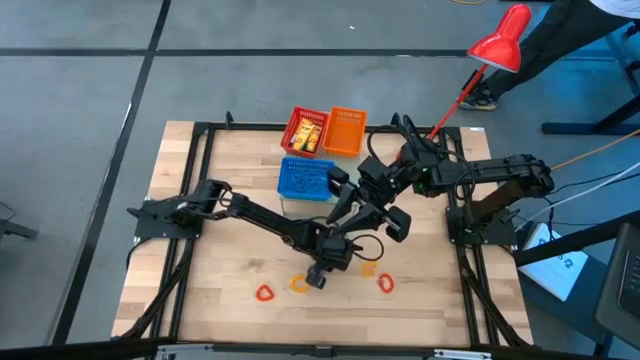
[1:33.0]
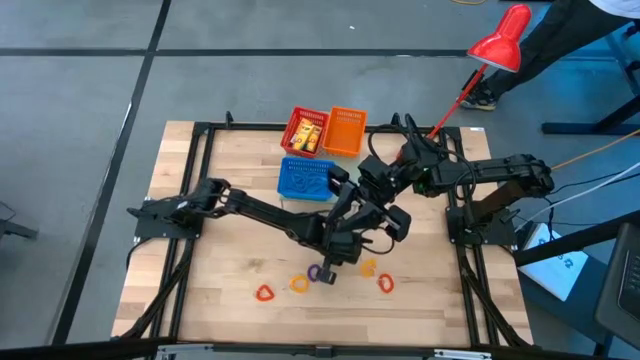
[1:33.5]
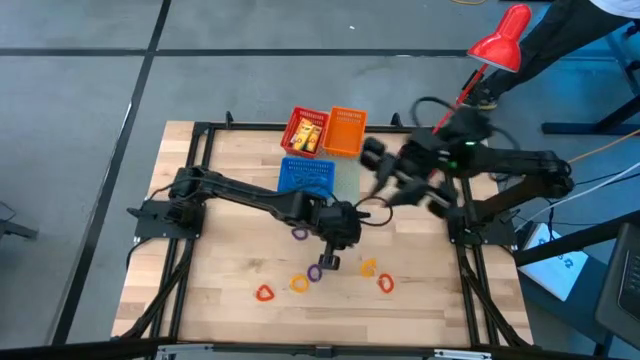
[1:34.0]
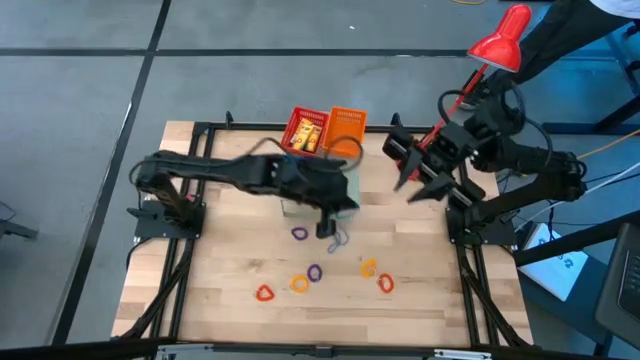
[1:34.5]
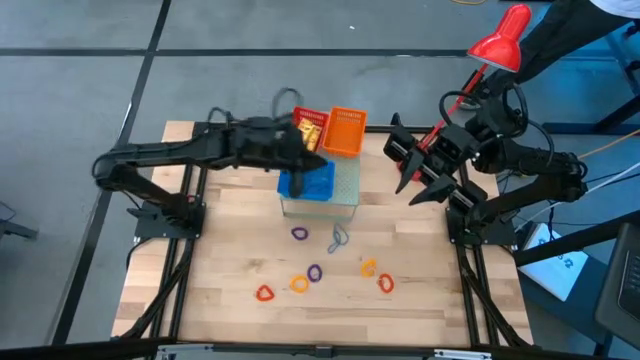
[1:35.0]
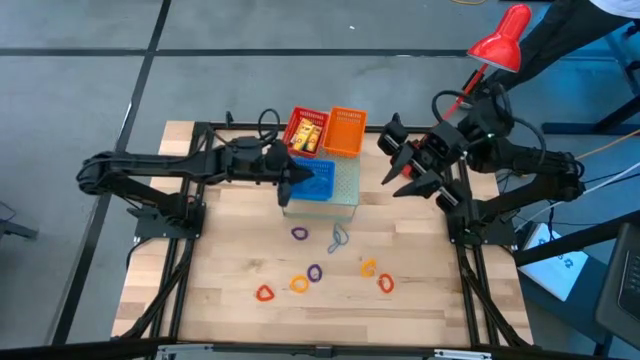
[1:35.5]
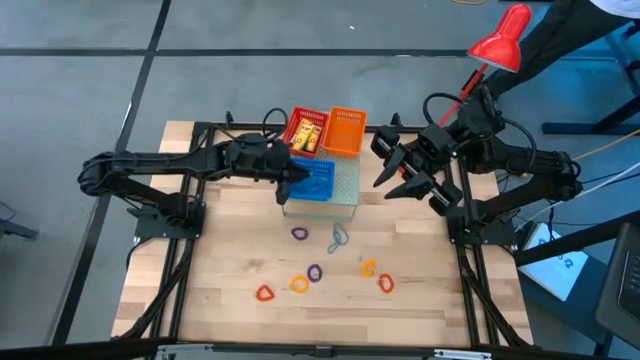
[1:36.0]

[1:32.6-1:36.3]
Task: Pick & Place Office Desk Supplies
Put the blue rubber band into the blue basket on the shelf

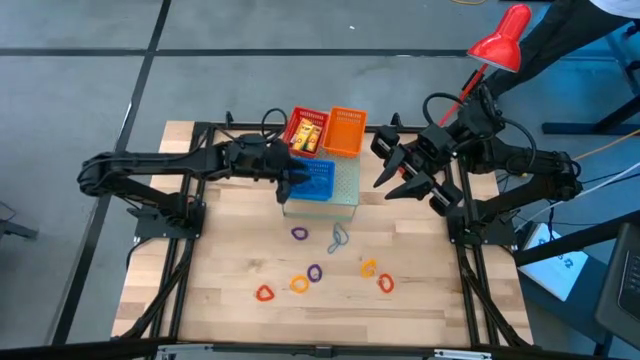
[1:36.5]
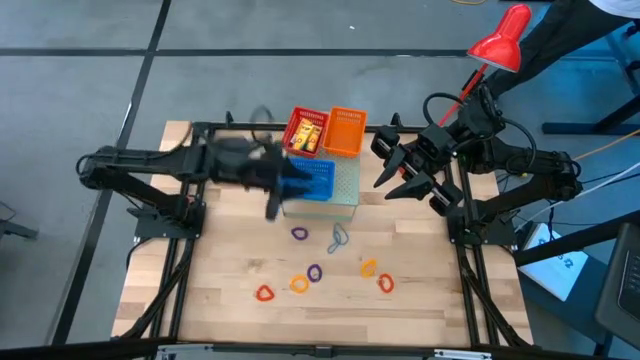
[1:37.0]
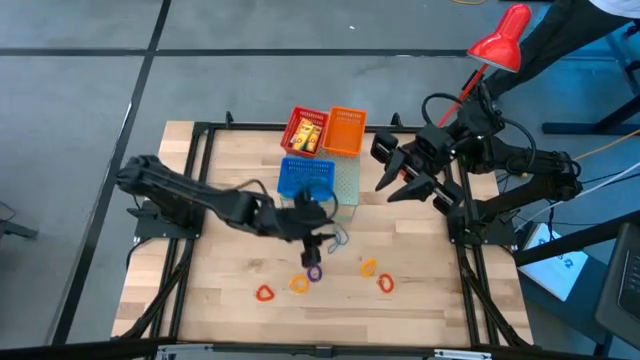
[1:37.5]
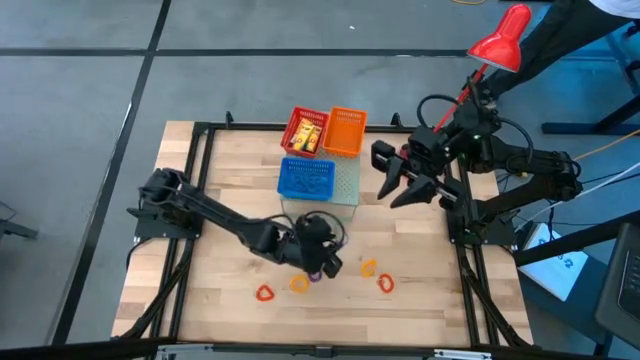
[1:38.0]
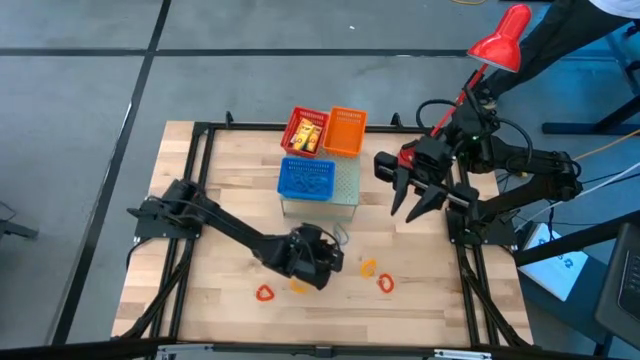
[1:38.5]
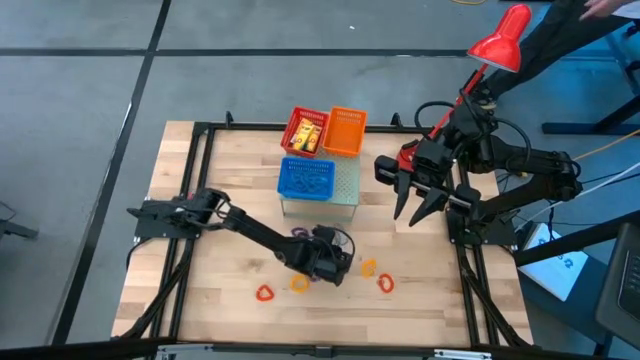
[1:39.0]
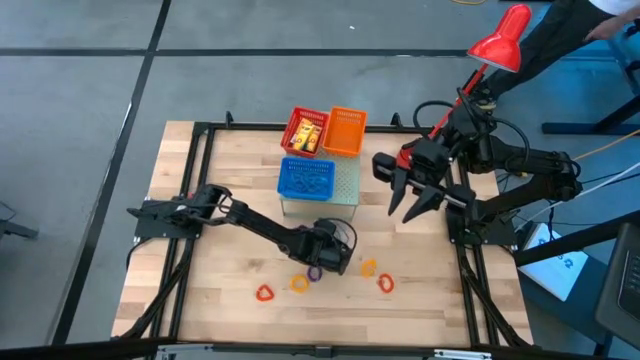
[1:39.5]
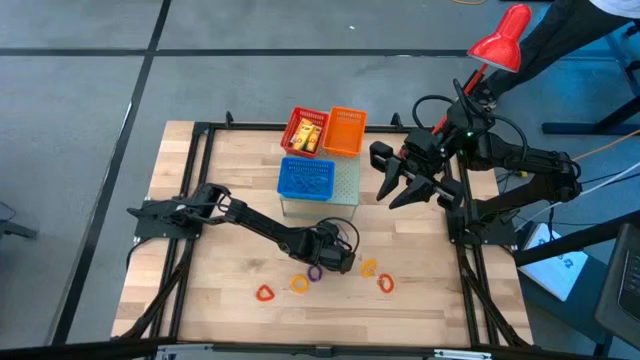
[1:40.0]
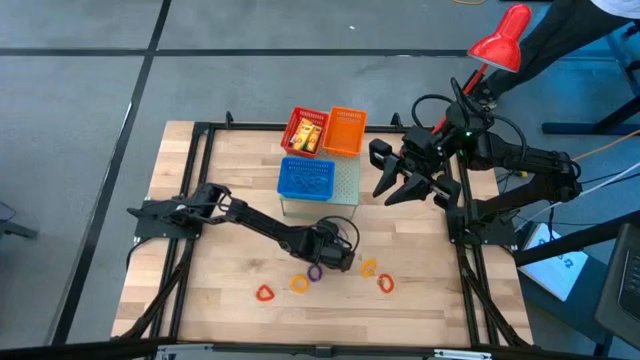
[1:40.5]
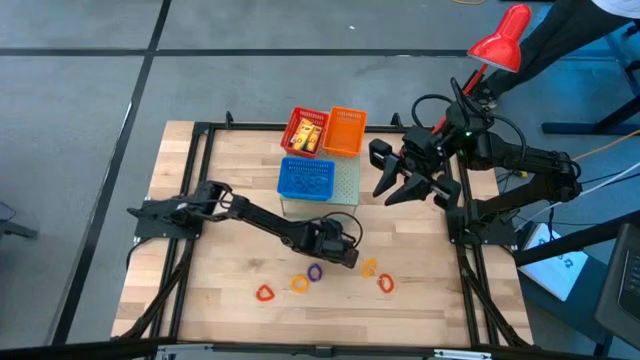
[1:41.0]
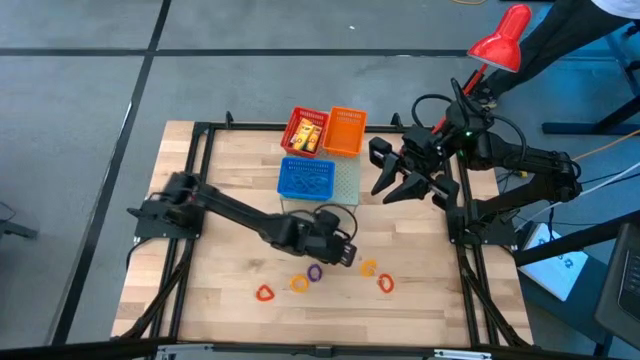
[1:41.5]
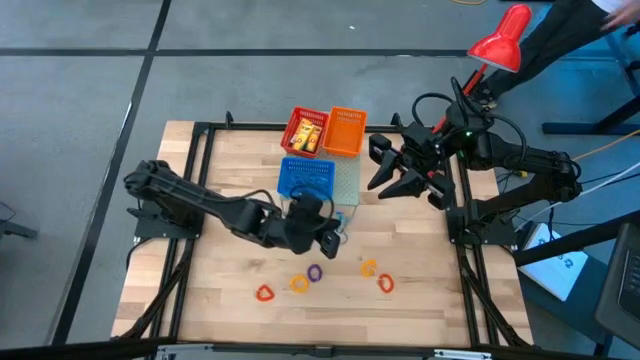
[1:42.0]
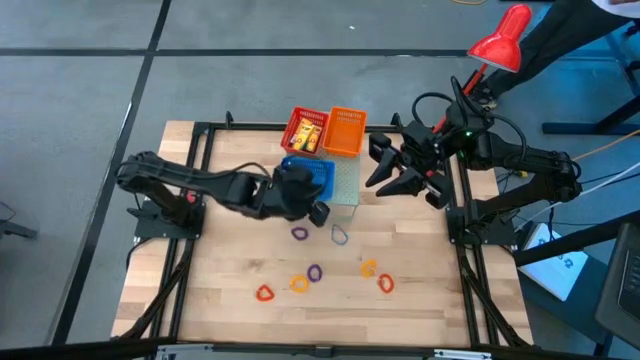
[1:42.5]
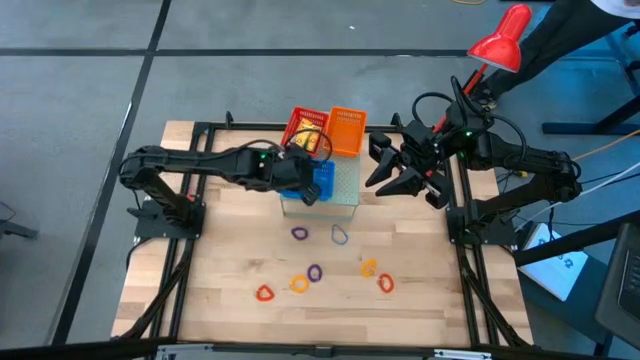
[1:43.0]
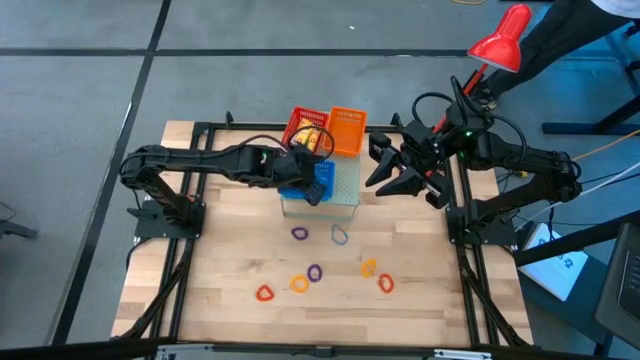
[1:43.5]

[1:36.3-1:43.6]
Put the blue rubber band into the blue basket on the shelf

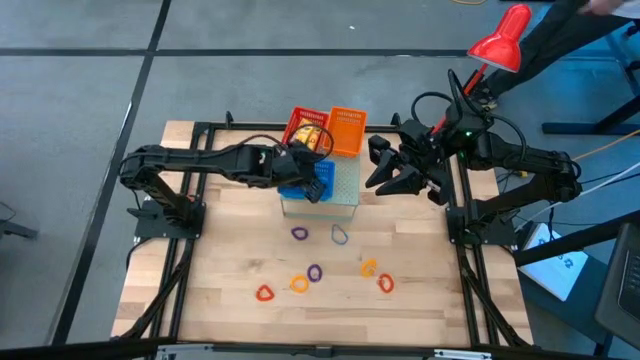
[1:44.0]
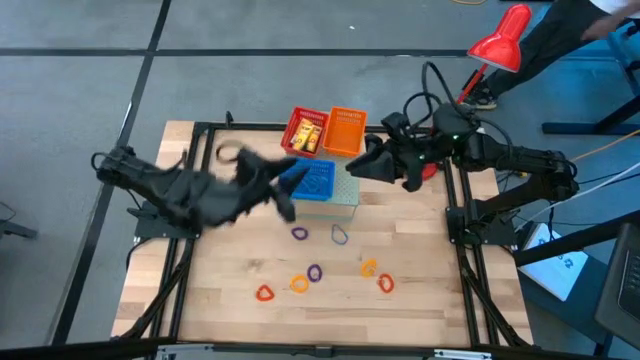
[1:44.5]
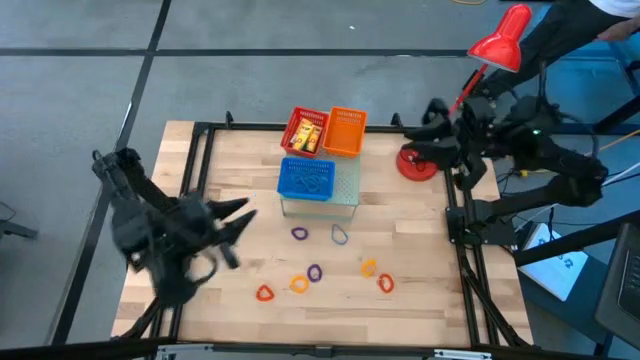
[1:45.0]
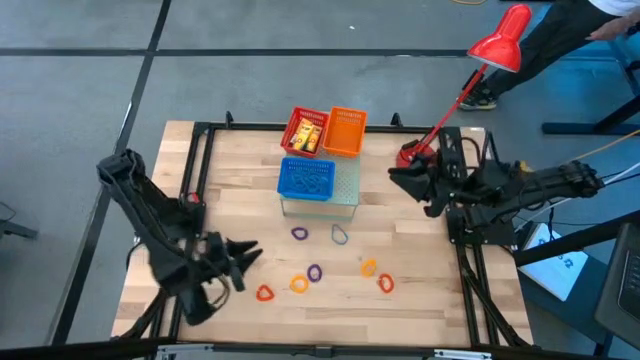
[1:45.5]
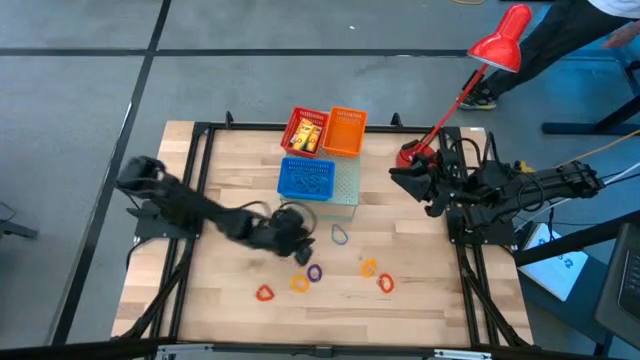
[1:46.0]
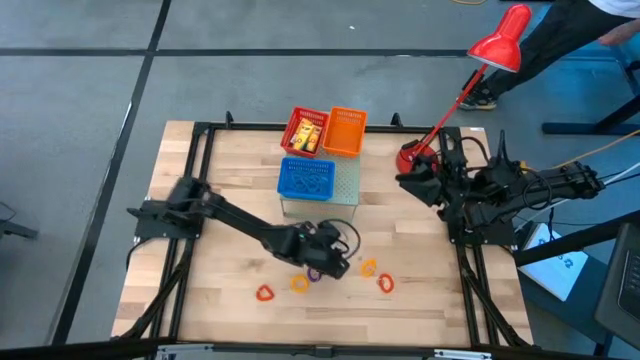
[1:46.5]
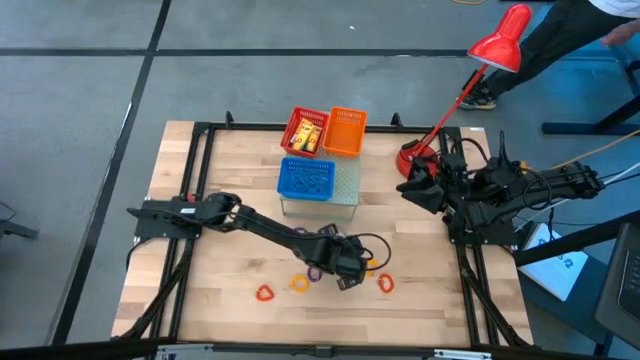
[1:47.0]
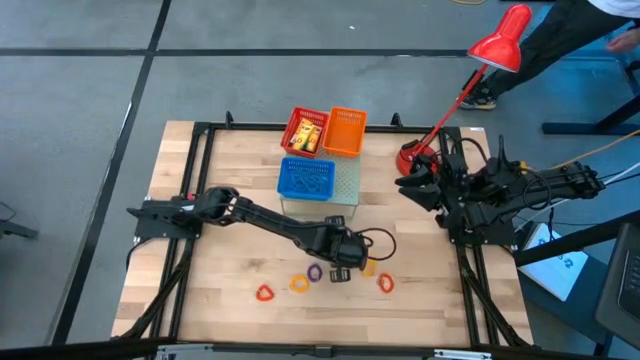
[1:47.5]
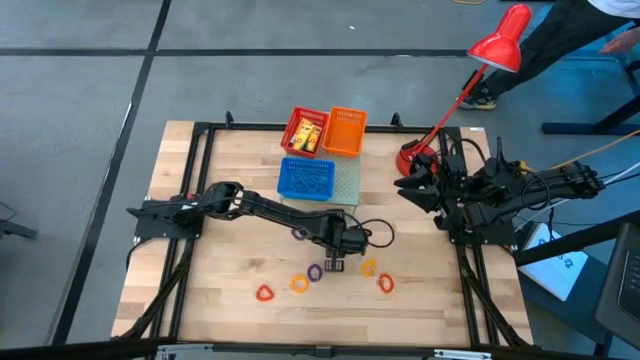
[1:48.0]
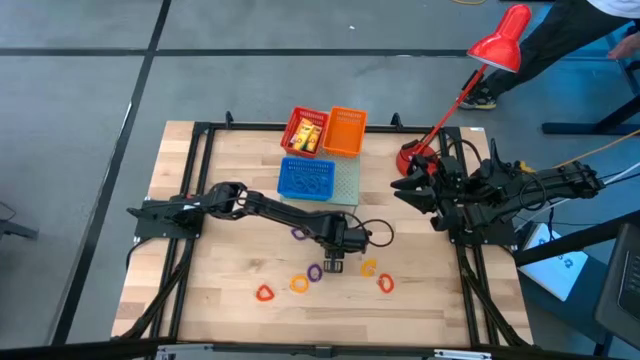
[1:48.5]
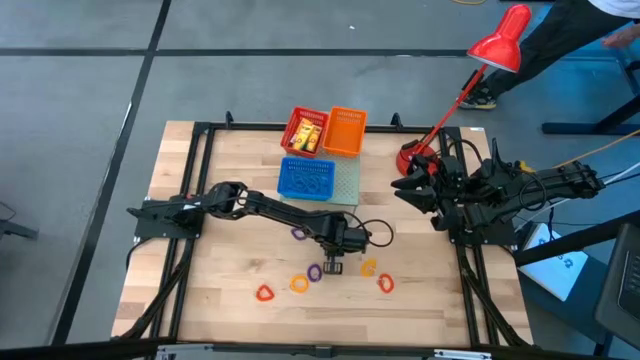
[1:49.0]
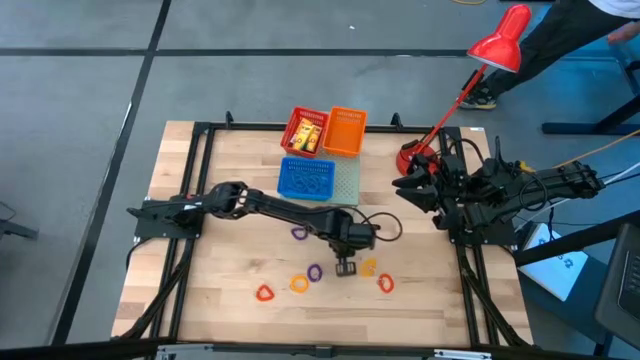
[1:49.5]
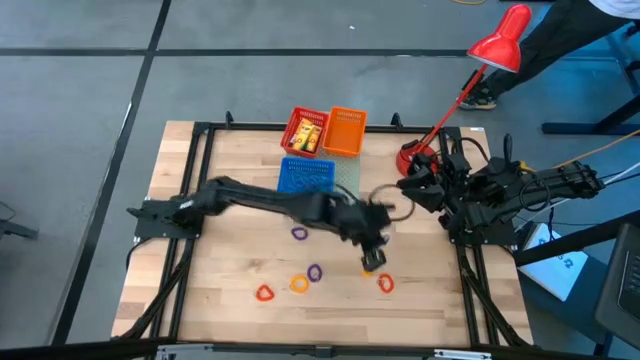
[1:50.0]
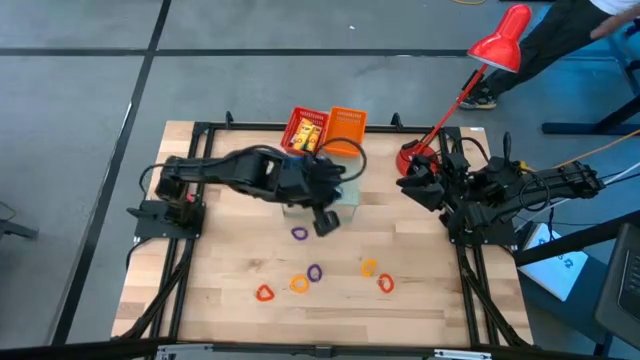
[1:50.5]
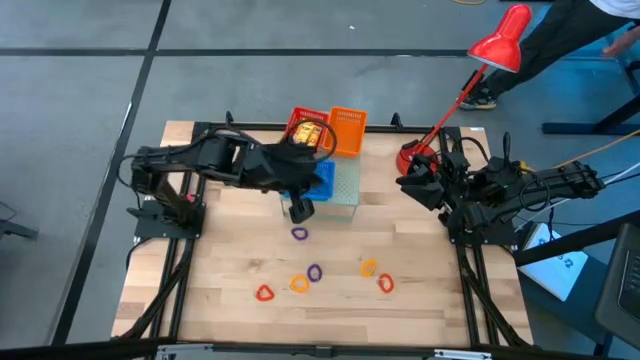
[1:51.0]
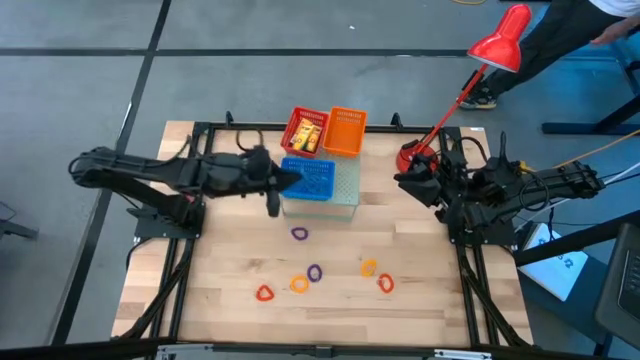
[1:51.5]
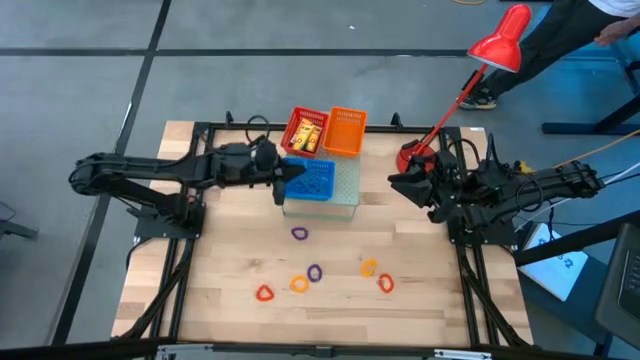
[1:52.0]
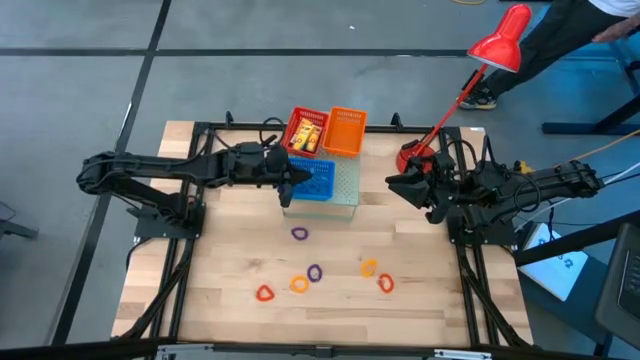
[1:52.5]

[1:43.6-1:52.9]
Put the blue rubber band into the blue basket on the shelf

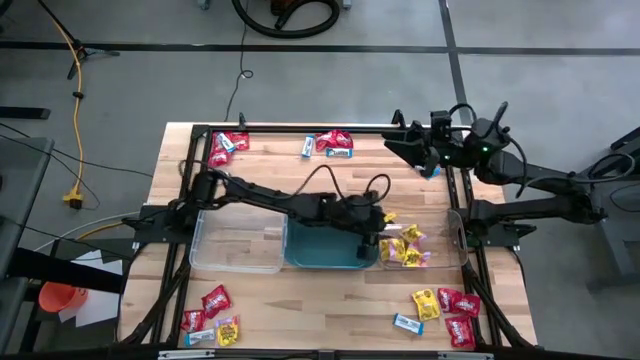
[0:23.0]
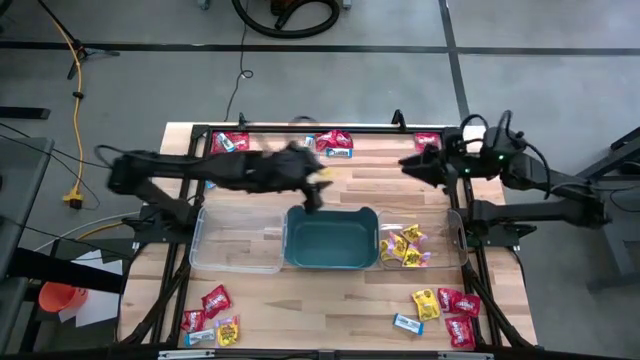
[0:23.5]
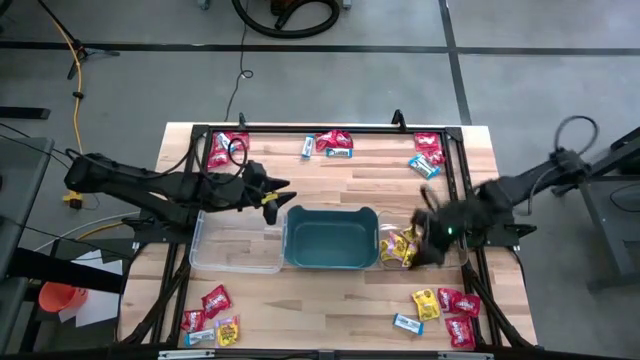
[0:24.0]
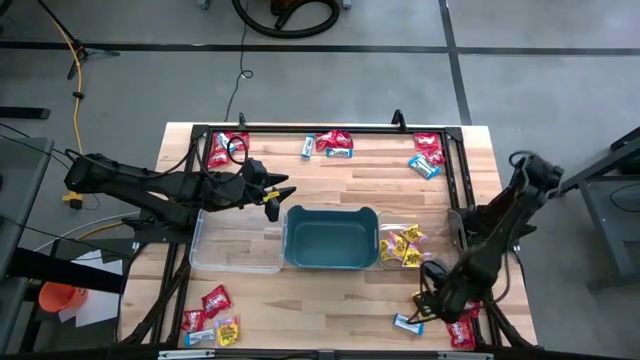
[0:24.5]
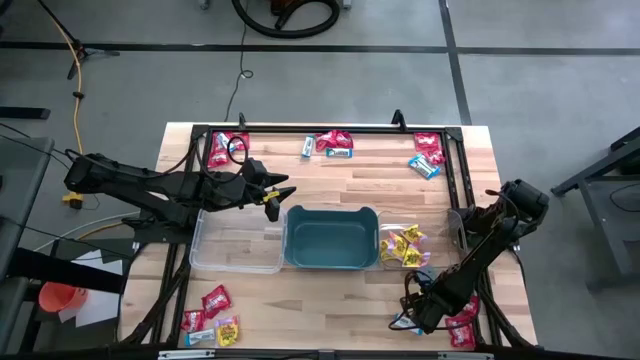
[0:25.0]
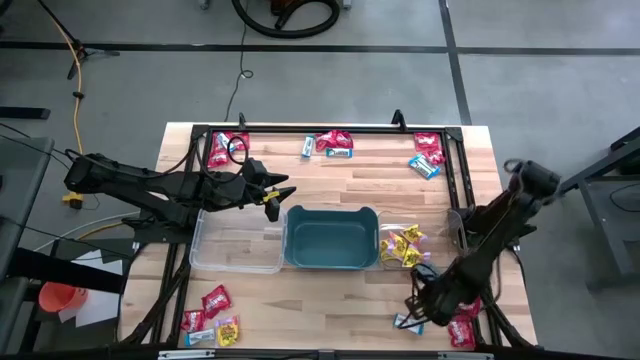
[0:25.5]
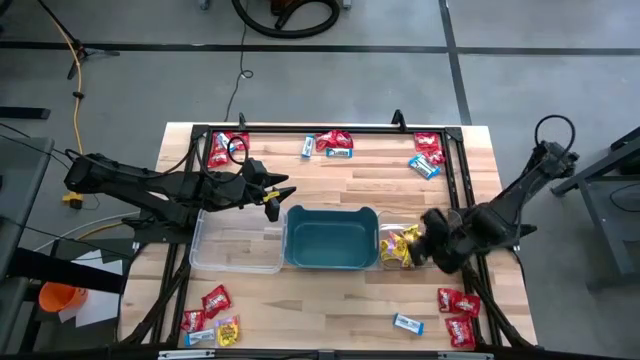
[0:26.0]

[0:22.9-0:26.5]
Task: Sort candy
Put the yellow candy into the right transparent bin
